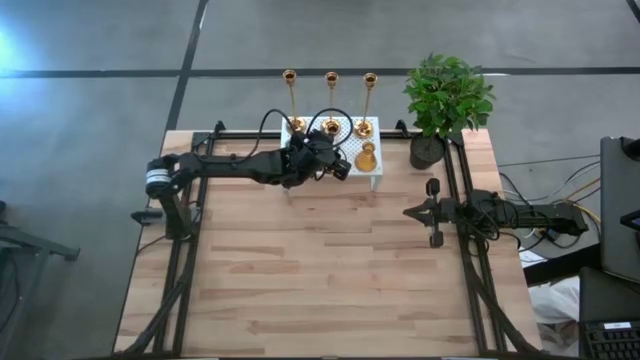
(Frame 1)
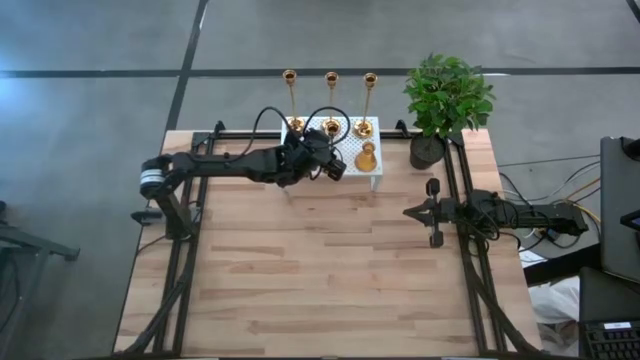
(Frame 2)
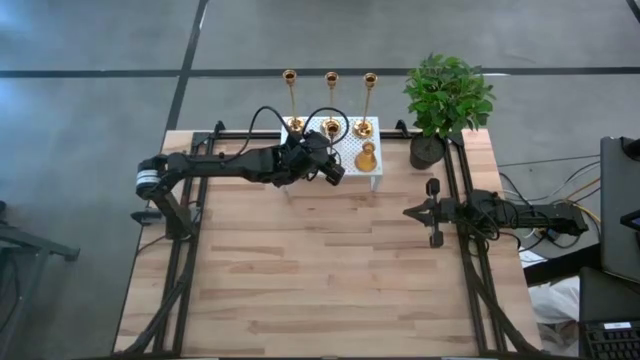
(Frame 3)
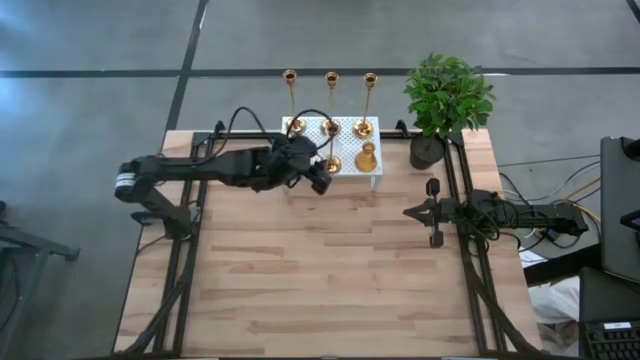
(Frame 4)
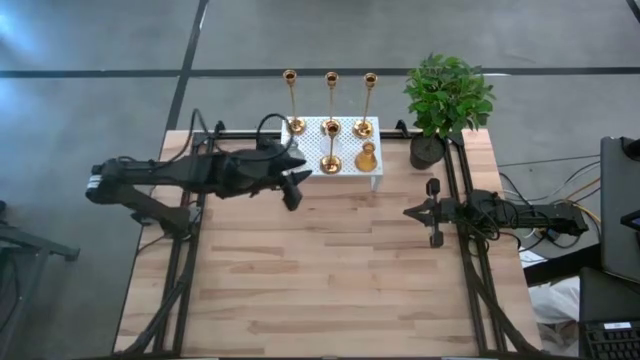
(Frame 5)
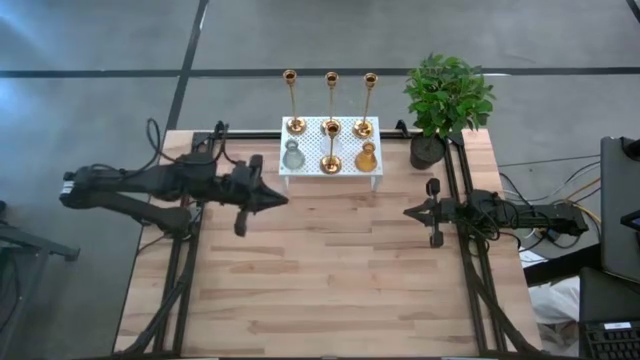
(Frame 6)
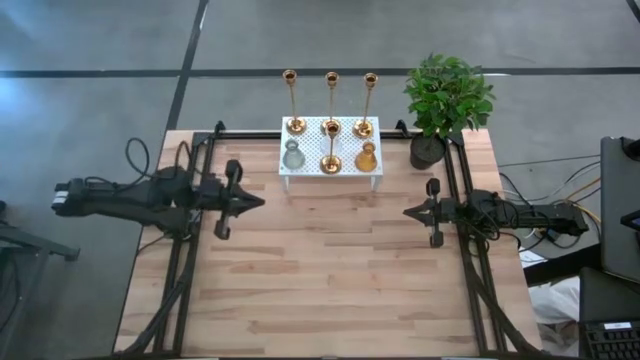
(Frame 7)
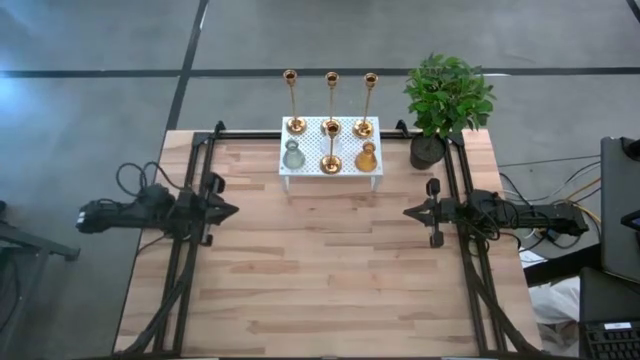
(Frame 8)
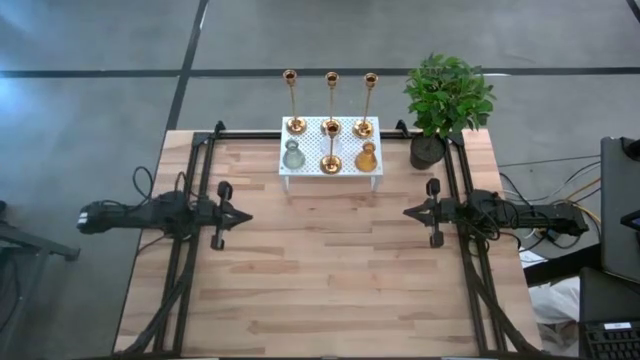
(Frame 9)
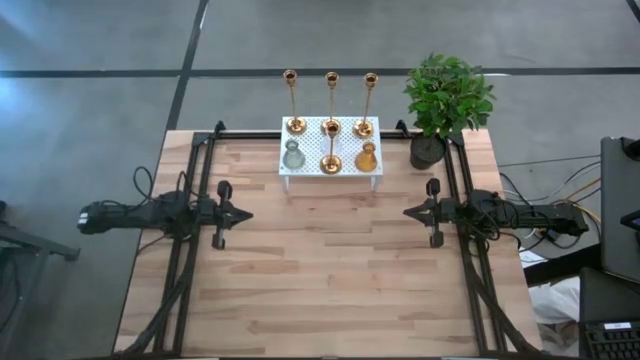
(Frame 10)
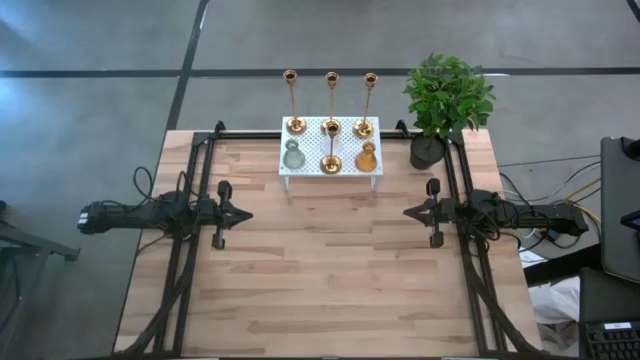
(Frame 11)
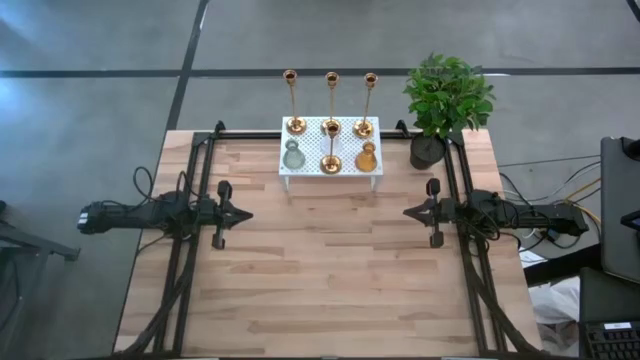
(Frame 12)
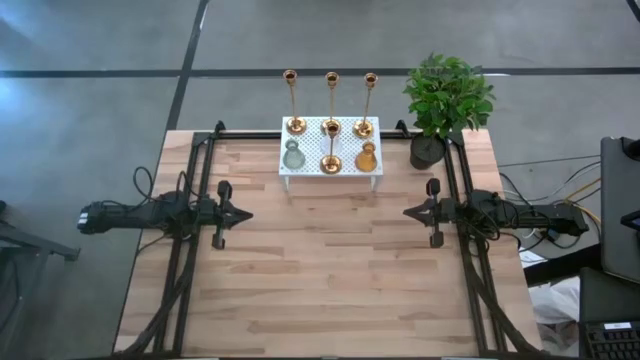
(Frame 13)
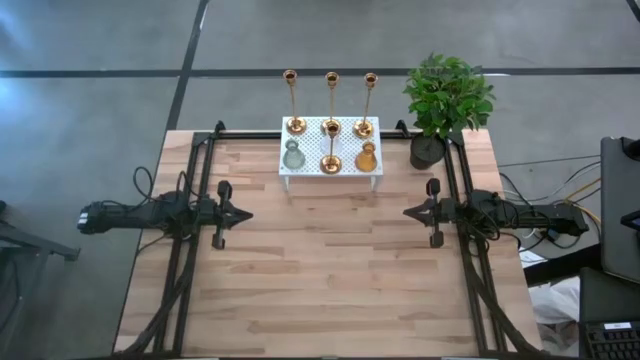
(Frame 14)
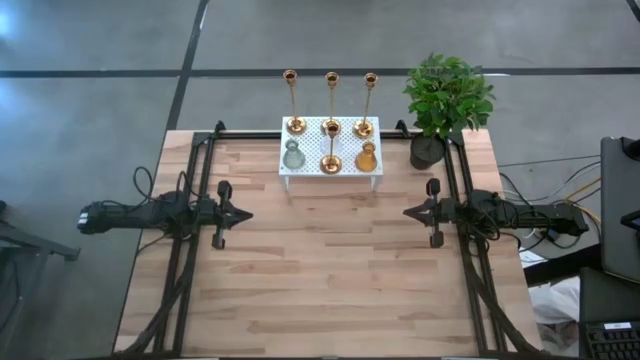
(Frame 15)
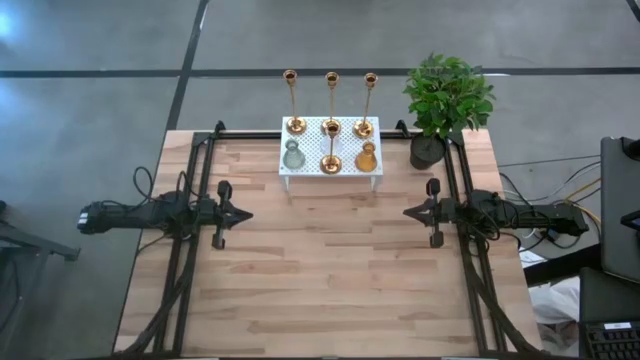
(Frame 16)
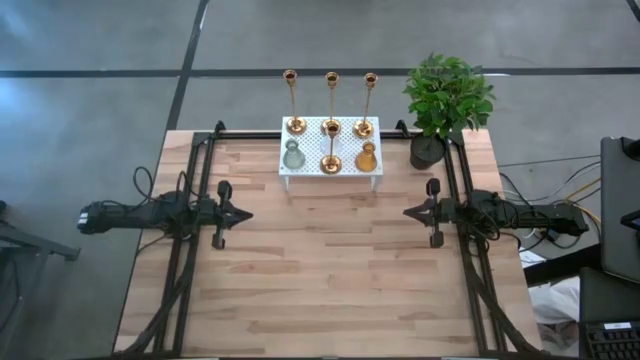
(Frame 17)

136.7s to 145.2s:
Task: Pick & Place candle stick holders
Return to Home Position

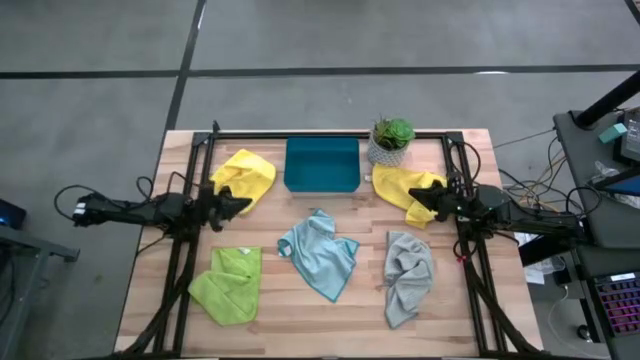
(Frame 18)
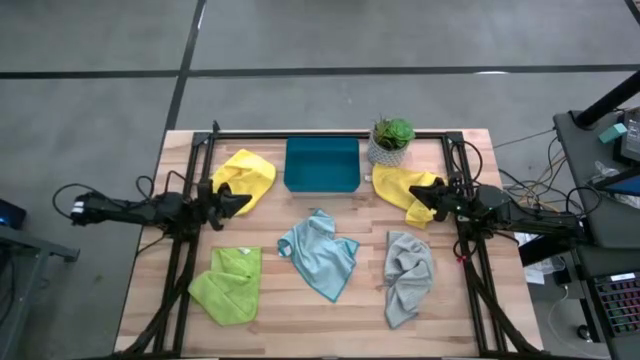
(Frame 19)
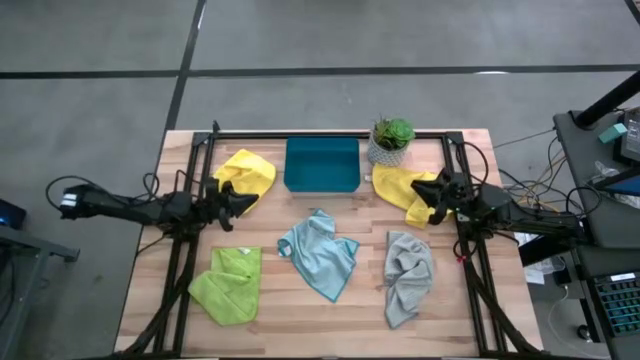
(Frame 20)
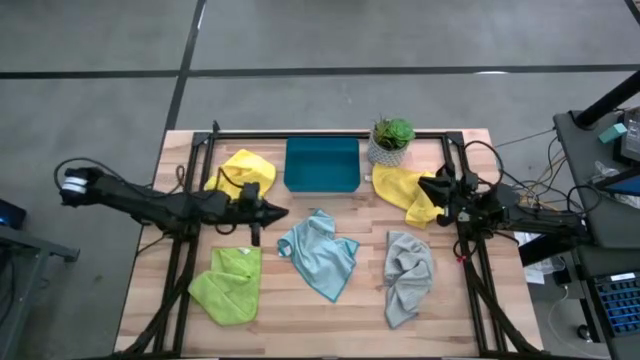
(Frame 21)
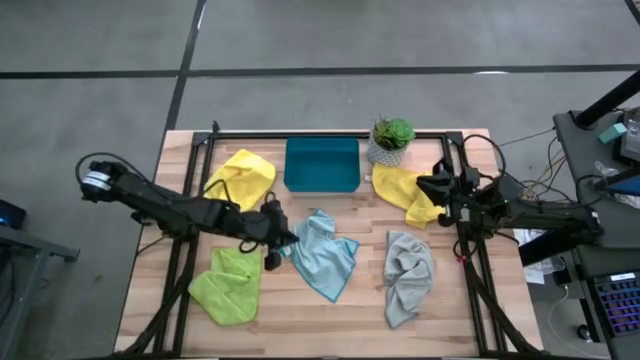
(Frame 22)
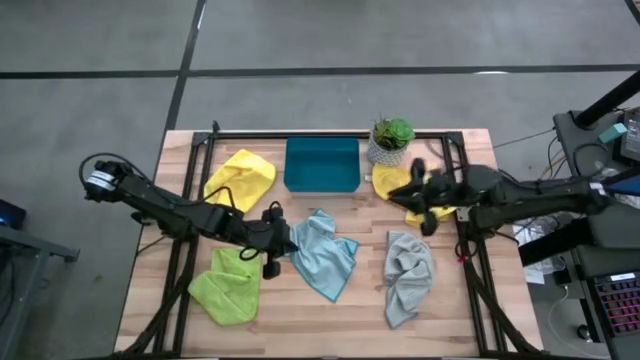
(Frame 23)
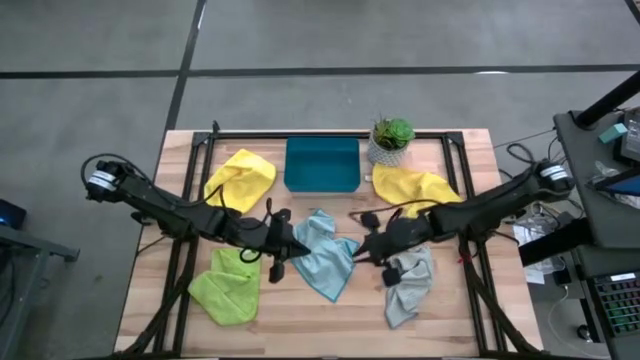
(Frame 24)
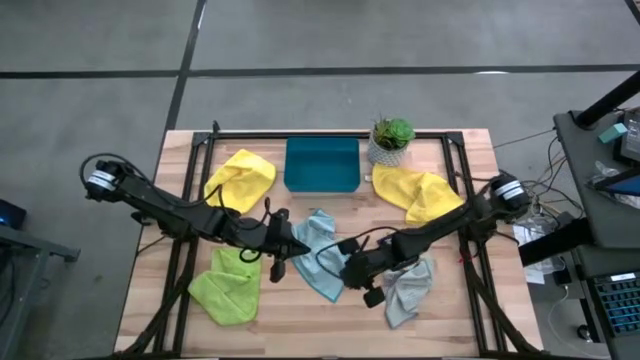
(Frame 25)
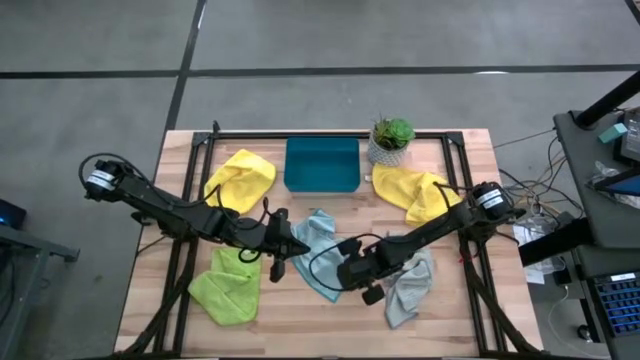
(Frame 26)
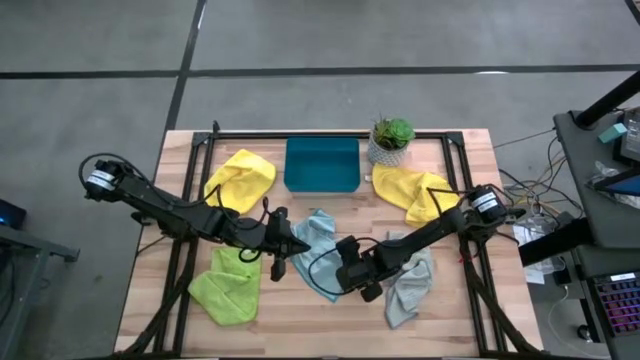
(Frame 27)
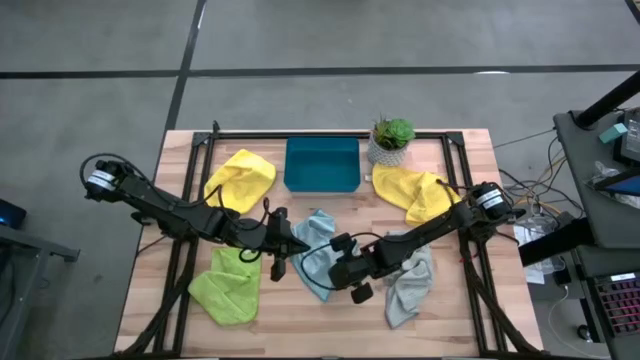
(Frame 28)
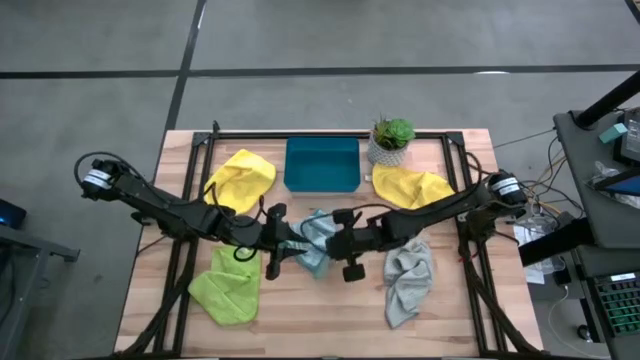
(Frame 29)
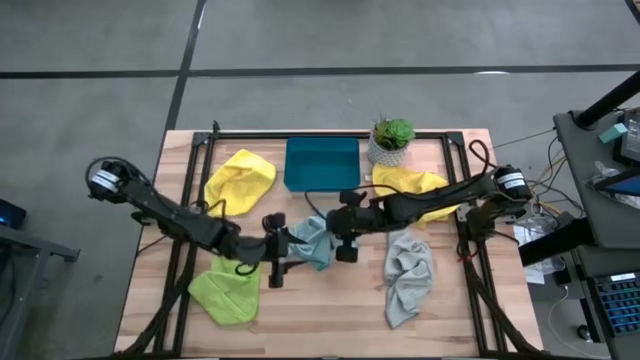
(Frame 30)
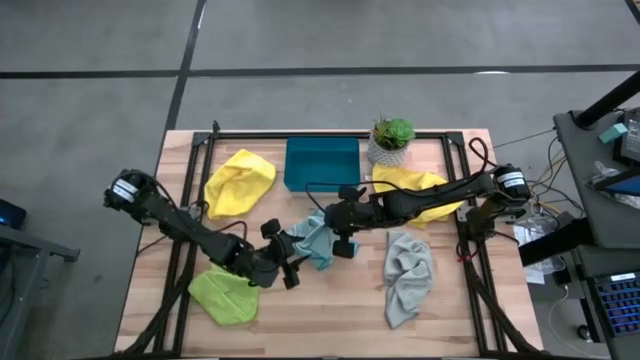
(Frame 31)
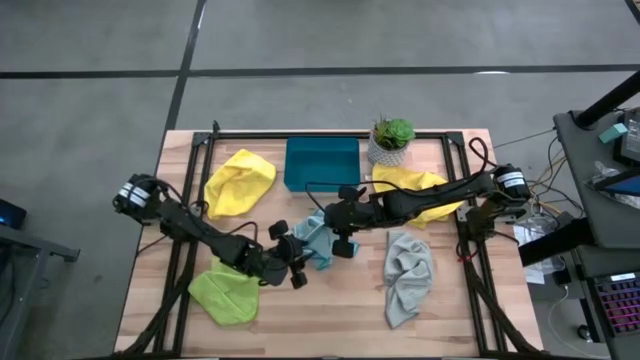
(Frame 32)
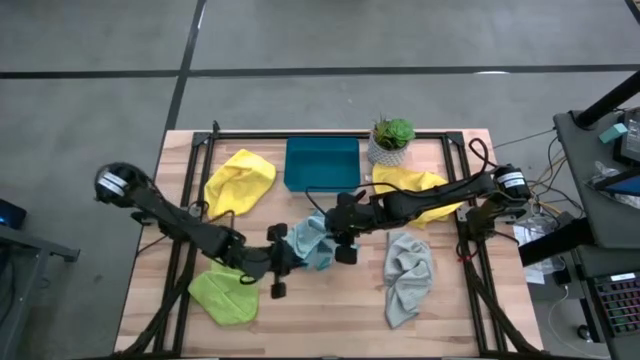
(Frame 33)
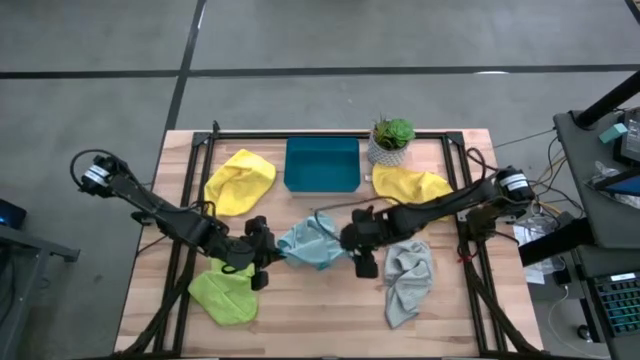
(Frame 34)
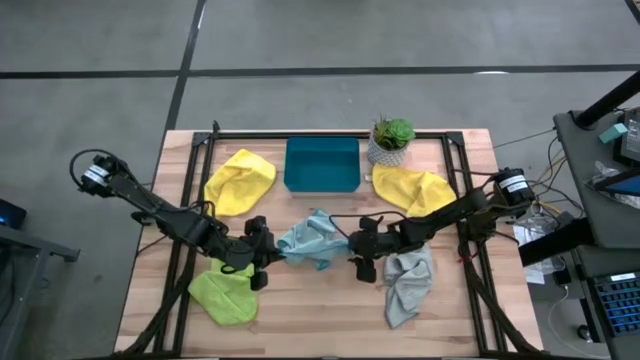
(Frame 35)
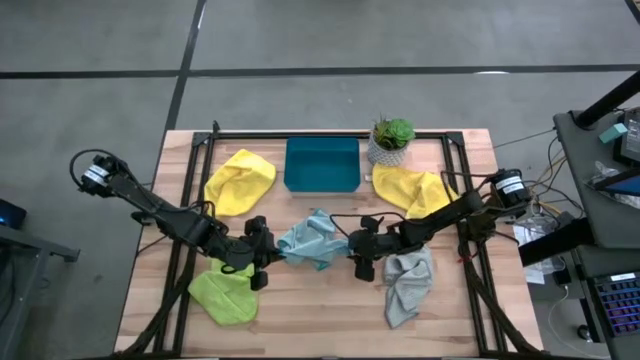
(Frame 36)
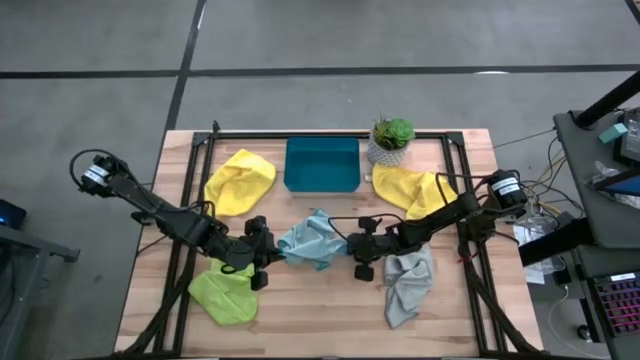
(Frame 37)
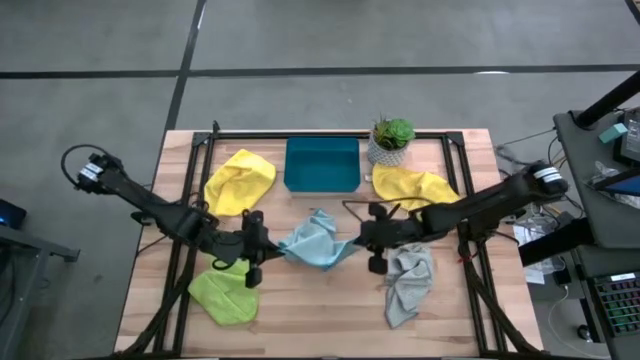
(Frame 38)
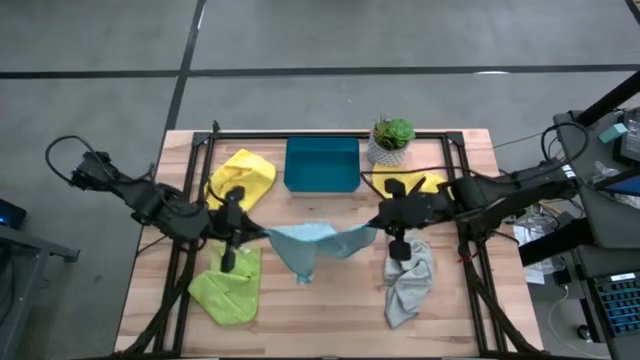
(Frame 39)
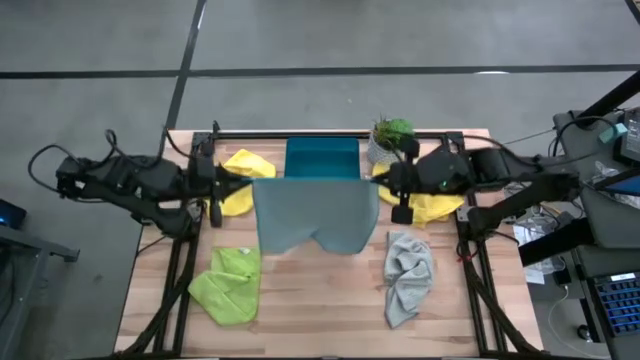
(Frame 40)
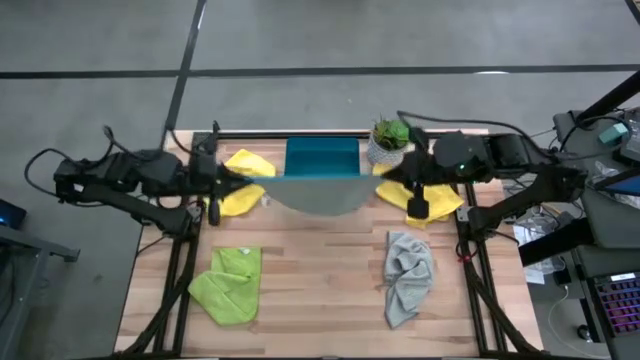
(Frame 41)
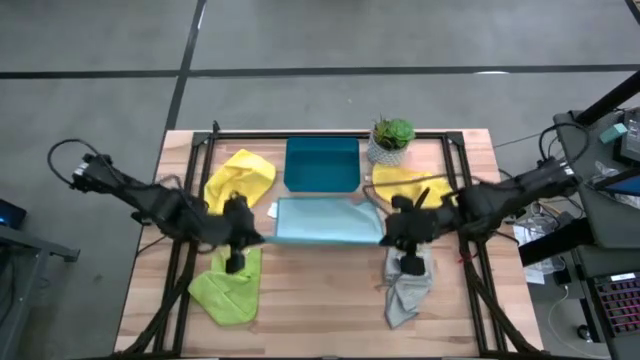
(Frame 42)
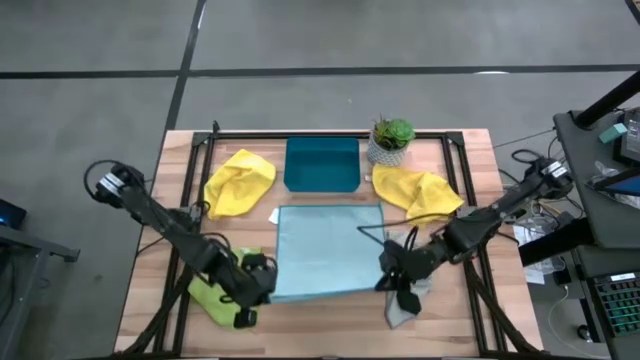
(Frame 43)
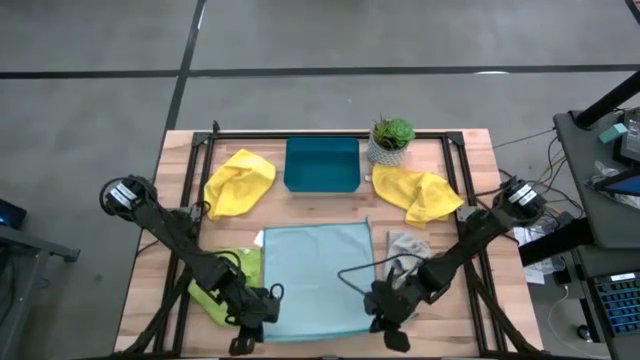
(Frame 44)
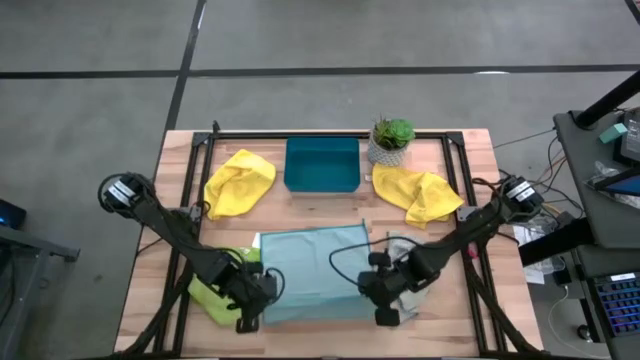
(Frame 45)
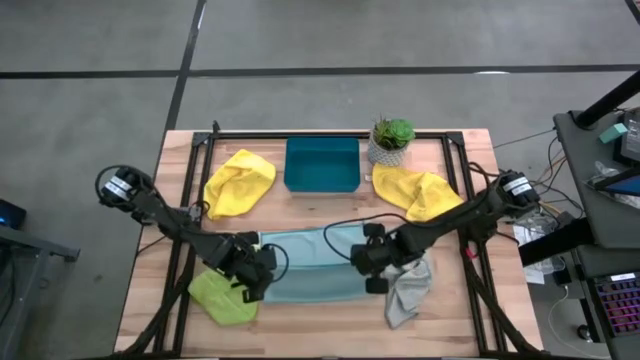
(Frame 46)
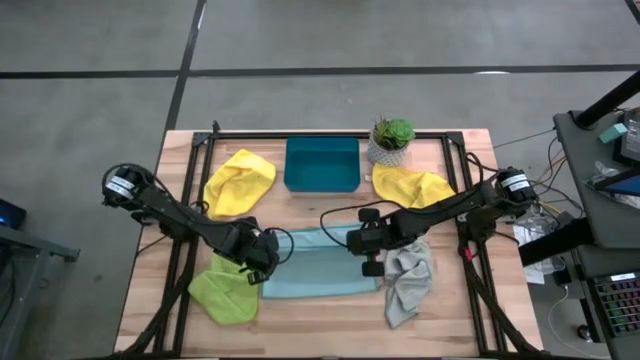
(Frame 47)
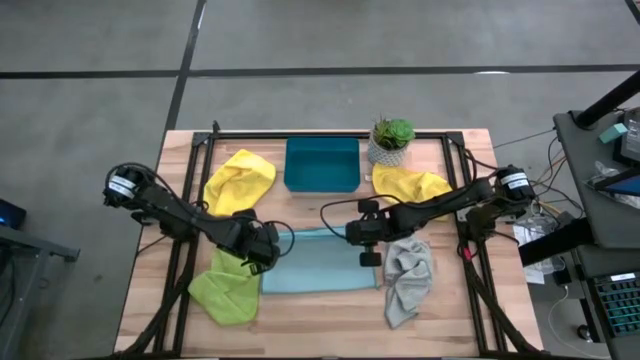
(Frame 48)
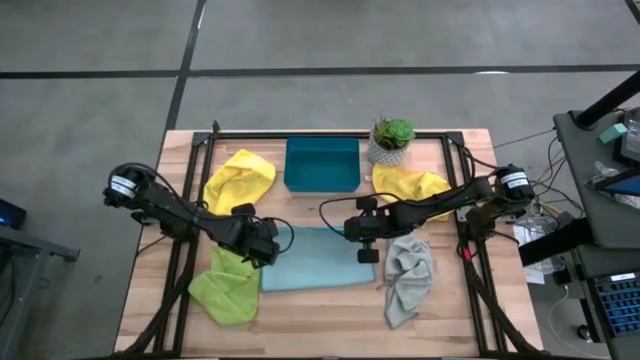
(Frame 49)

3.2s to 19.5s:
Task: Fold microfiber towels
Fold the blue microfiber cloth
